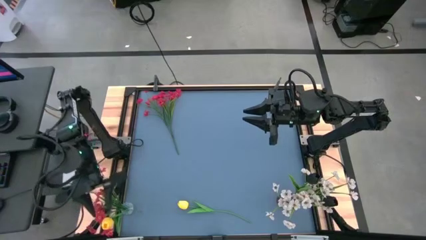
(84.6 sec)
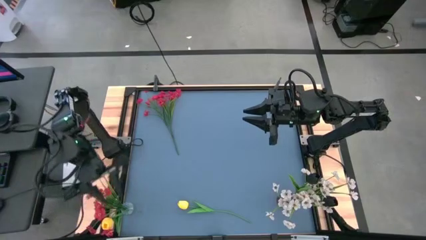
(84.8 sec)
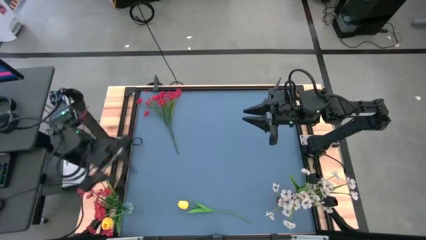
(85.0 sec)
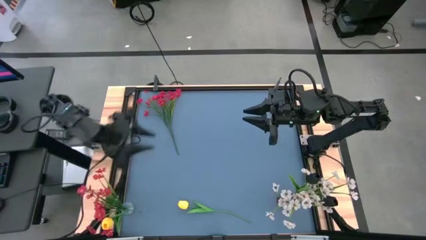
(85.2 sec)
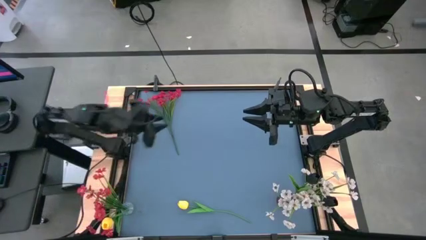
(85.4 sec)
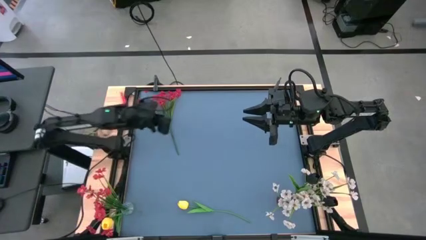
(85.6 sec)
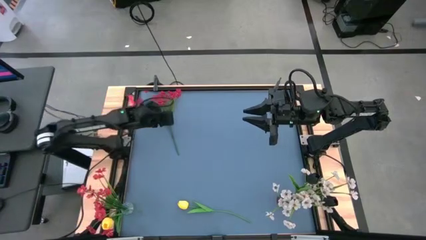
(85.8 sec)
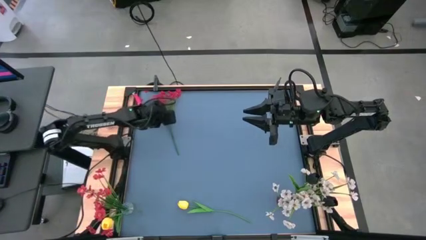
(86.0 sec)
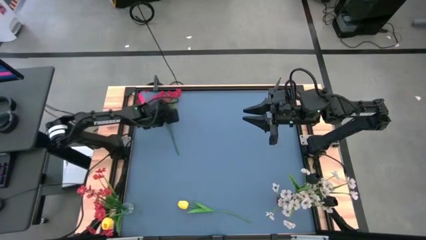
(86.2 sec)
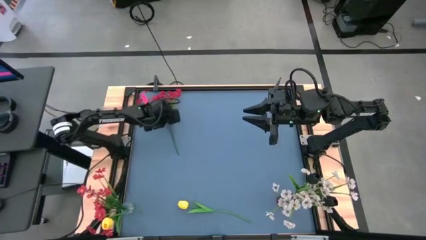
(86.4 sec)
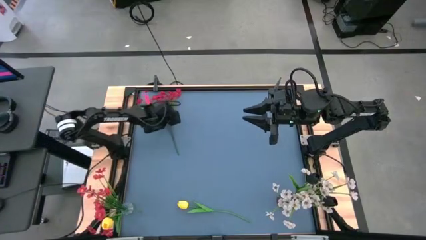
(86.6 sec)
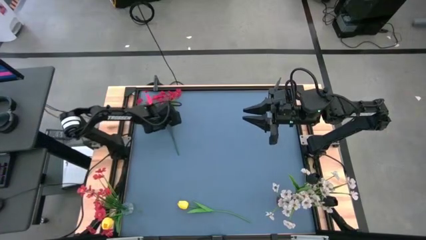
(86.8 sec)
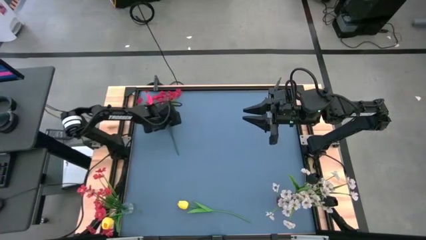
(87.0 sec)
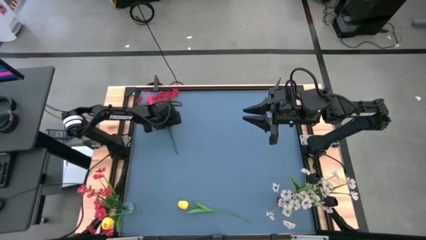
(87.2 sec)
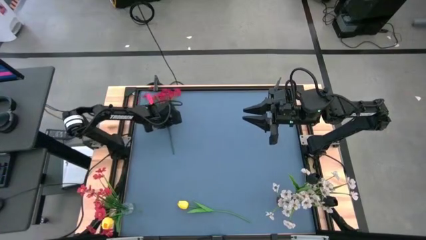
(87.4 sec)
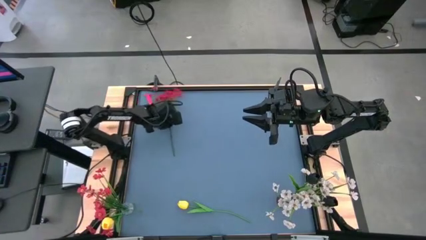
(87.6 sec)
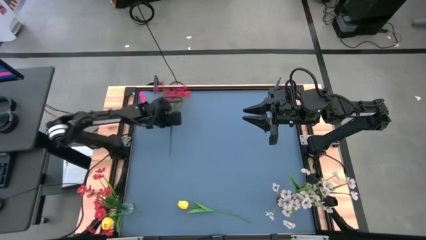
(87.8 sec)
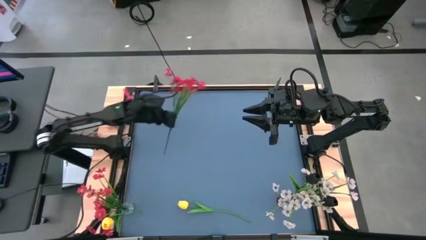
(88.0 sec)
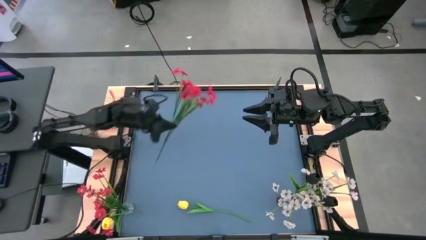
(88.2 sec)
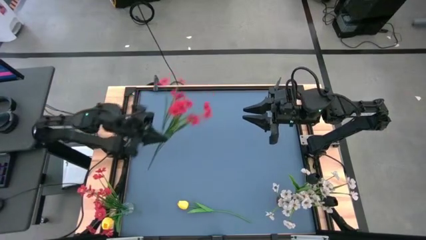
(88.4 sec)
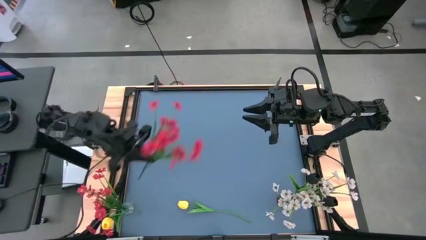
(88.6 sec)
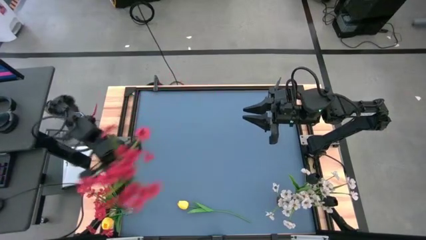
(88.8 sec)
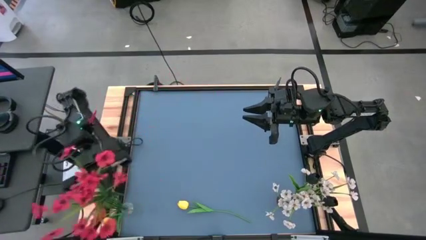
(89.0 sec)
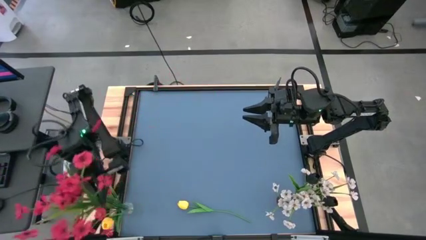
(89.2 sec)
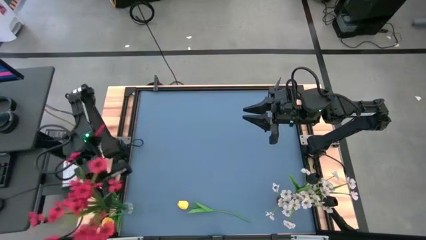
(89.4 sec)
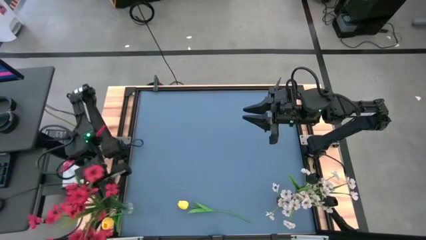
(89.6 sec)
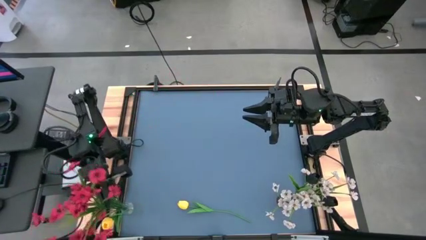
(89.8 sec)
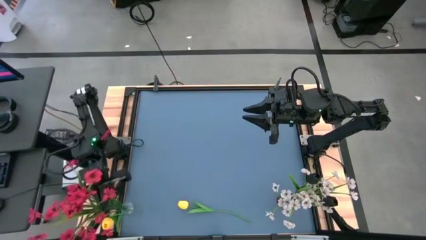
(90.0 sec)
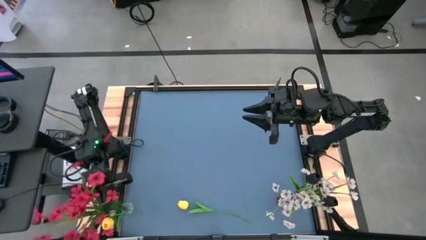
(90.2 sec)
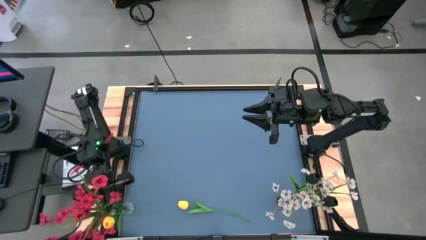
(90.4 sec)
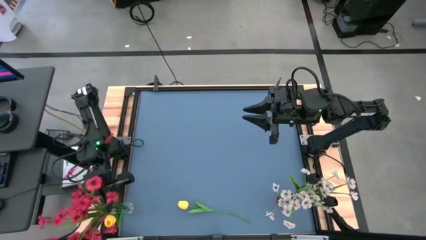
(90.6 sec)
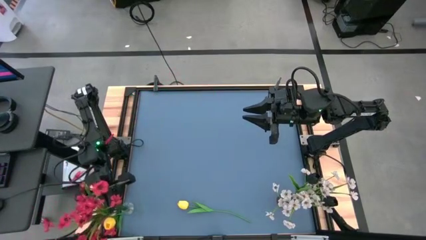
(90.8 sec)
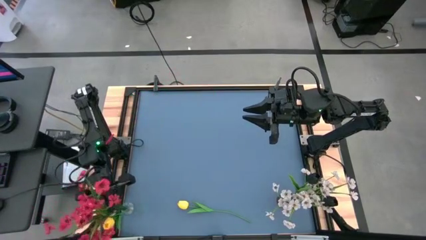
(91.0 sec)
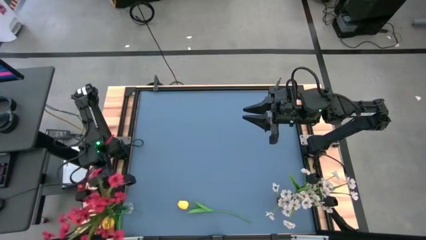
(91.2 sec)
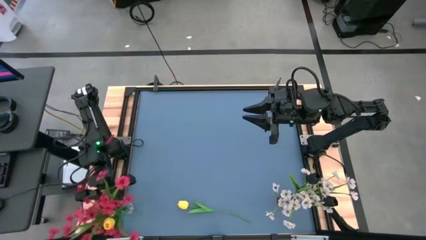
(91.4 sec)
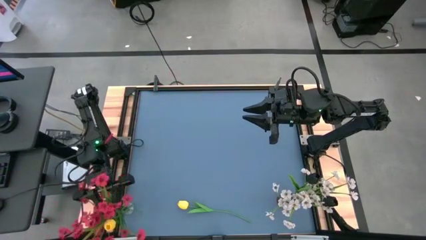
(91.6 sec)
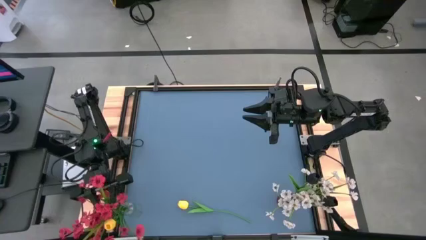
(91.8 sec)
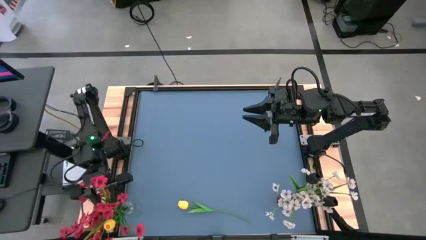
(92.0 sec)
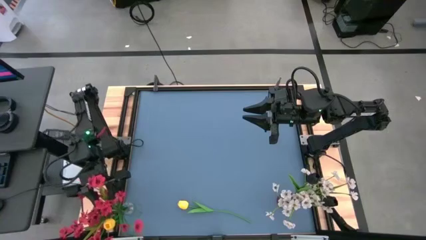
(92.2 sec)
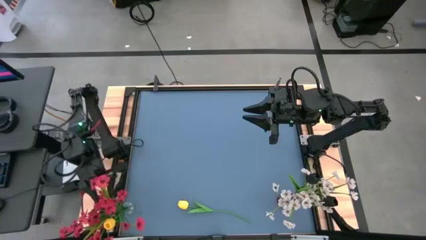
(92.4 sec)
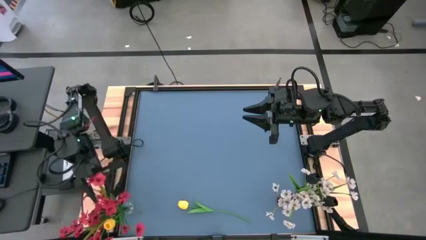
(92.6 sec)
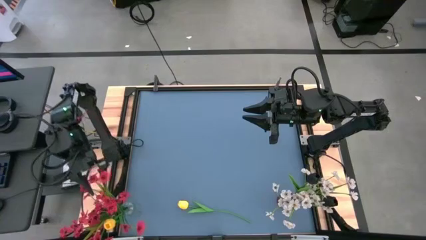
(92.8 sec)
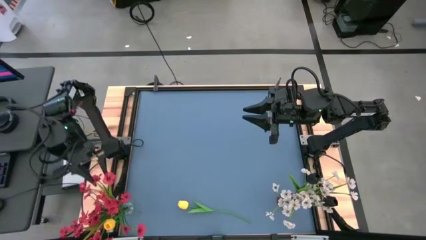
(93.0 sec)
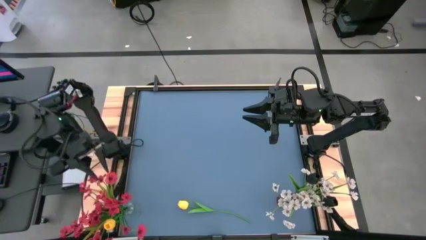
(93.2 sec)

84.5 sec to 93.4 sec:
Task: Sort flowers into vase by color
Put the red flowers into the transparent vase

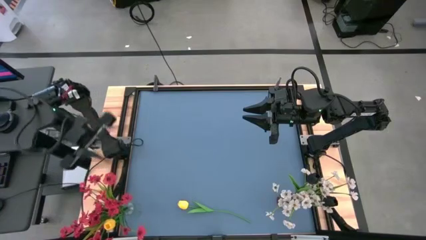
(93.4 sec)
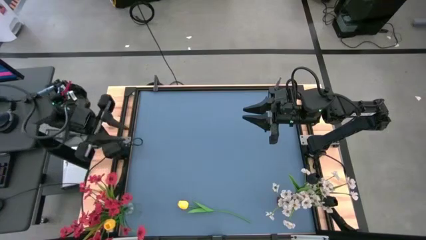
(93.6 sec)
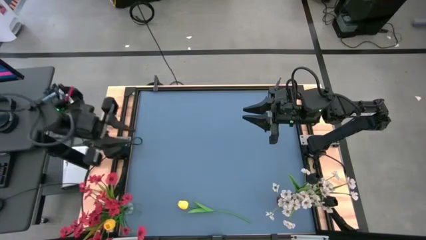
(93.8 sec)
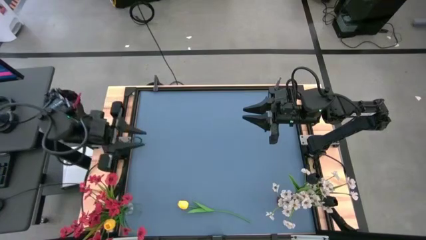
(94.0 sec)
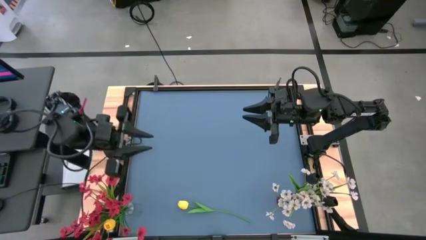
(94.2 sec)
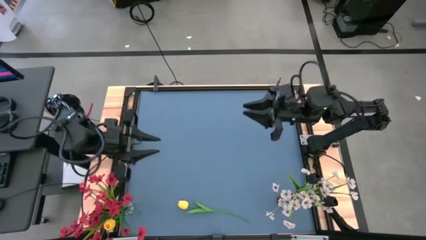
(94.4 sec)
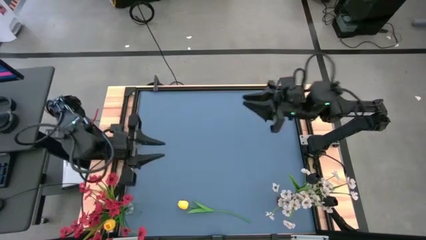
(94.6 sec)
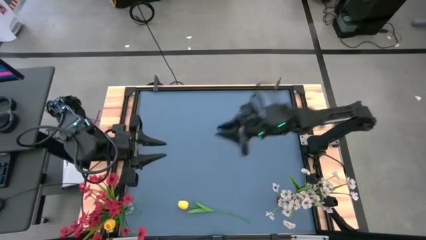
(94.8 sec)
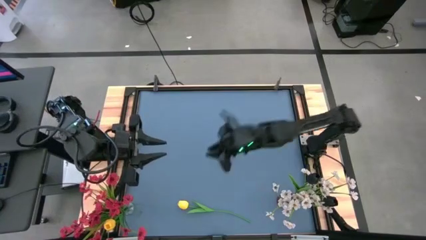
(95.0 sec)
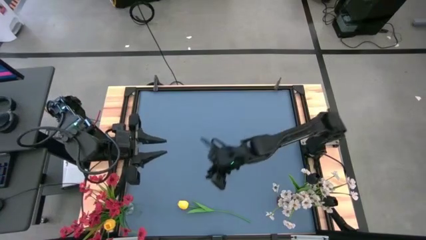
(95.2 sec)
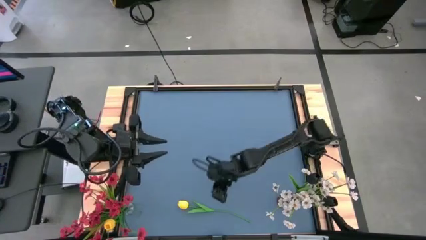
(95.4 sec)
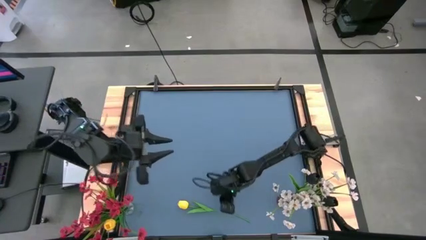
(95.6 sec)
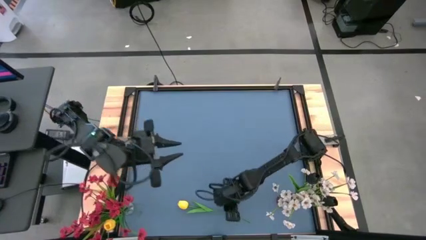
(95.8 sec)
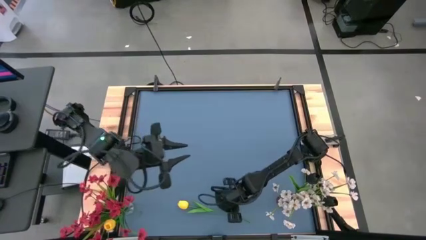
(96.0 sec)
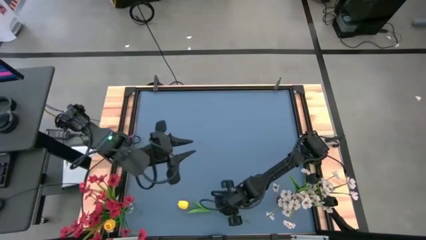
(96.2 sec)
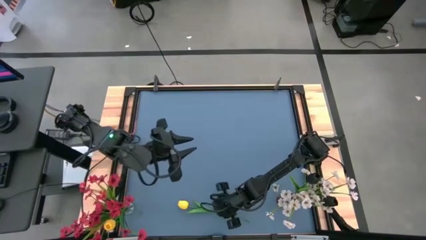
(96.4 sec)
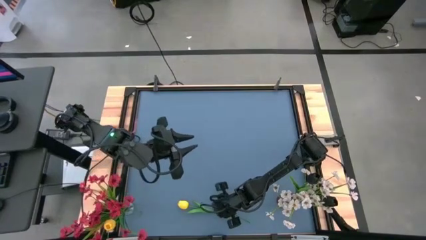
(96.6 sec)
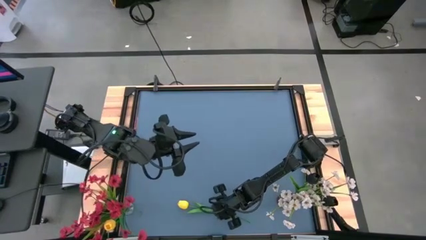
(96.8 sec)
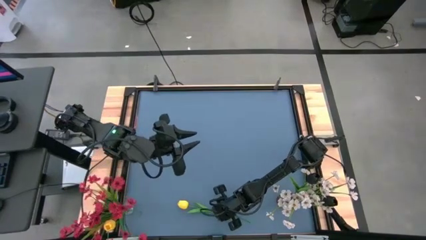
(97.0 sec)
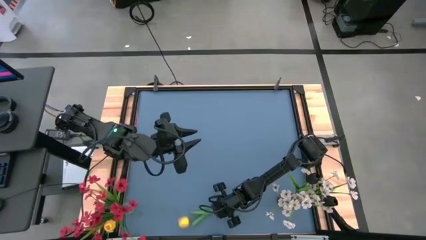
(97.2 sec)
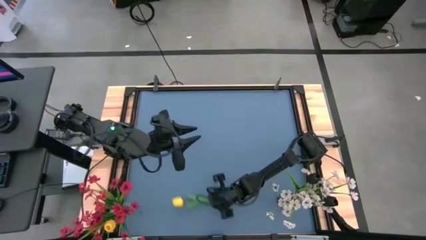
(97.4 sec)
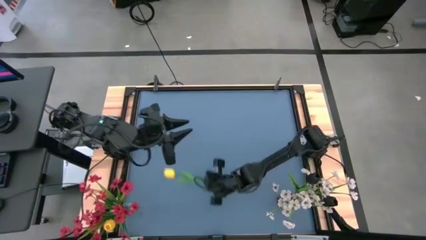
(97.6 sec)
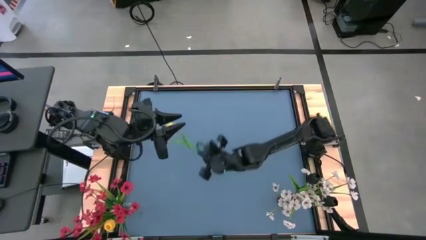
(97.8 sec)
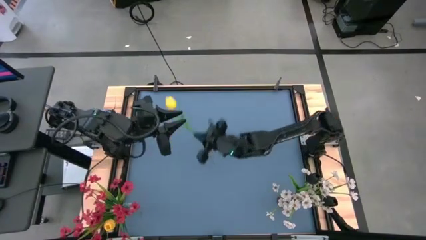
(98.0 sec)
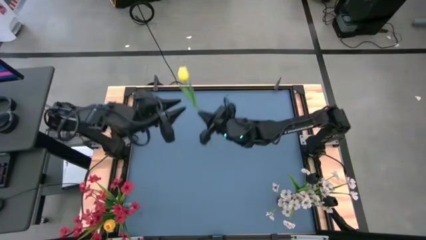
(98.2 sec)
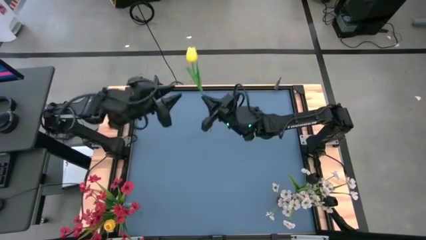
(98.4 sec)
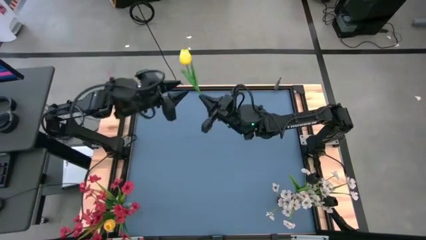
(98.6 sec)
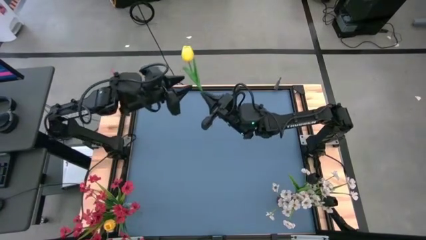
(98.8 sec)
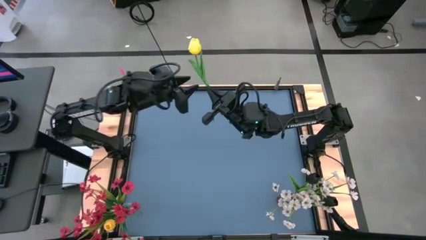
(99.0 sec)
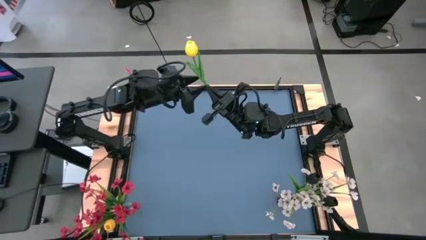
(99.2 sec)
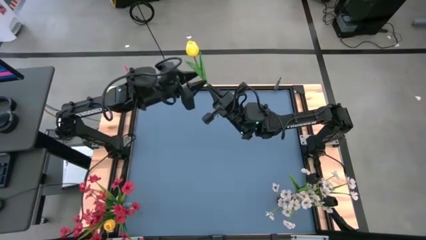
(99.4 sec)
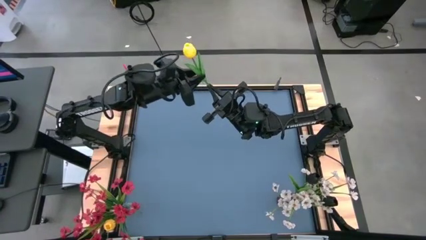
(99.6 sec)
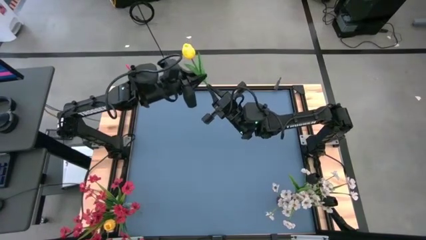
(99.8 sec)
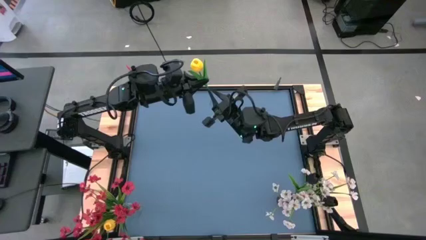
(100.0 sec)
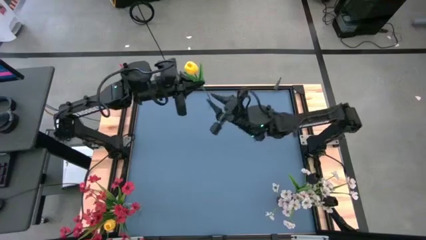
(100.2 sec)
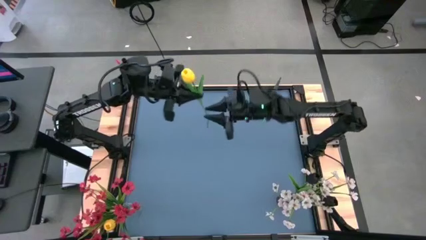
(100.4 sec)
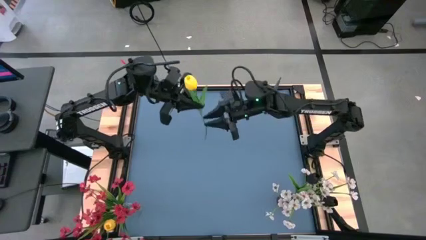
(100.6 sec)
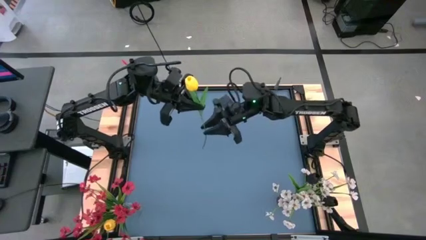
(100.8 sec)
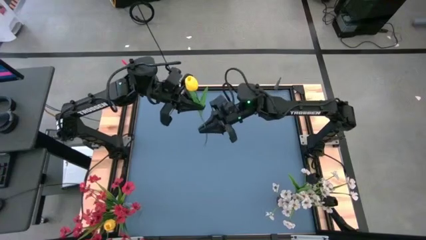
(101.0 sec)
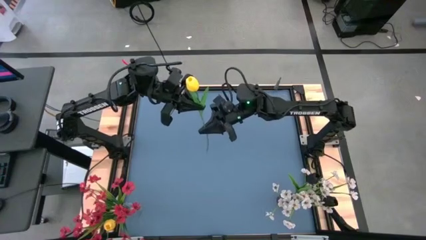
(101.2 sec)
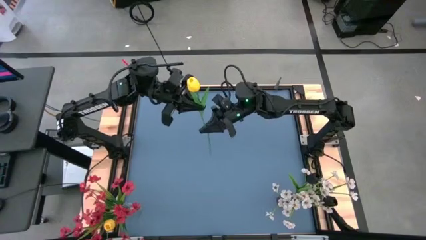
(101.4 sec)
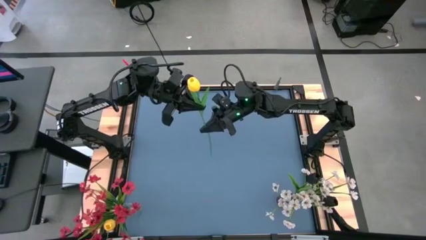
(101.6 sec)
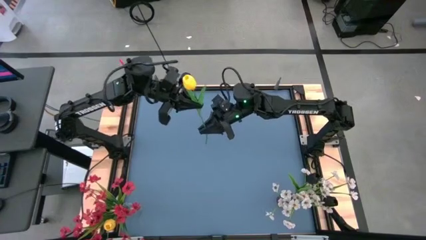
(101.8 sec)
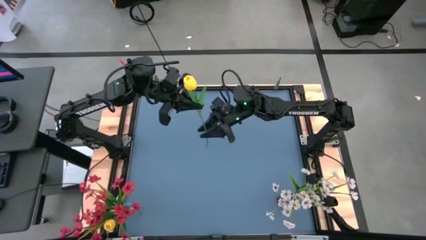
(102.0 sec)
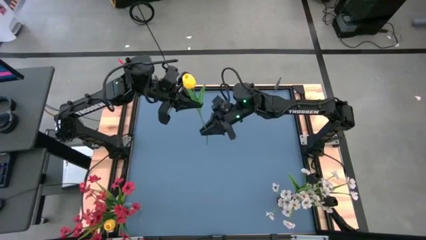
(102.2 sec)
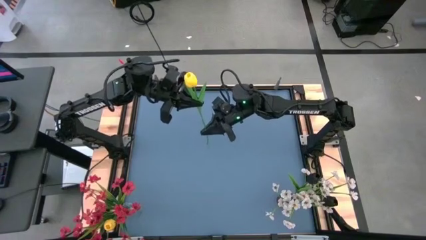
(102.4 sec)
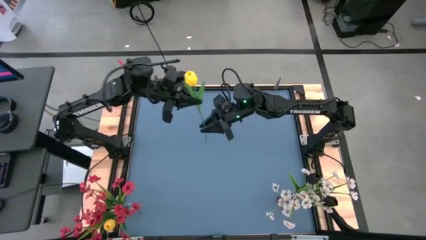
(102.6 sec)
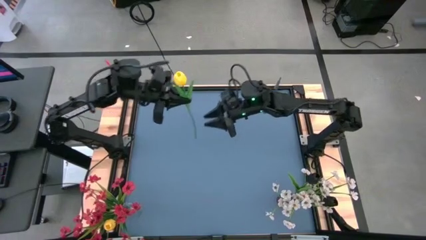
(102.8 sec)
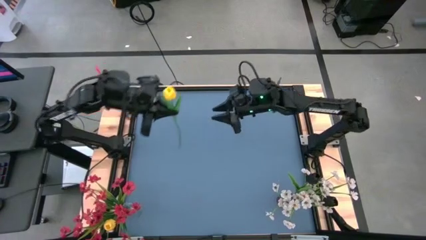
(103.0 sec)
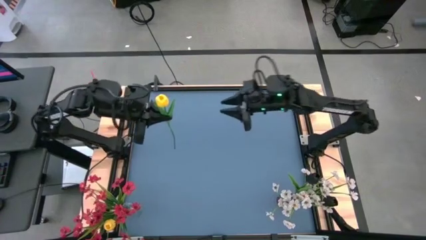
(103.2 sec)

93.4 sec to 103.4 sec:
Put the yellow tulip into the transparent vase
